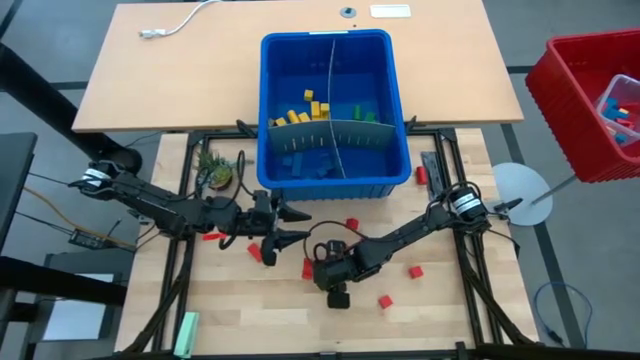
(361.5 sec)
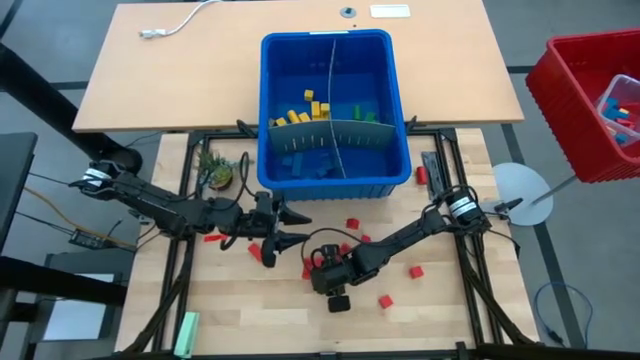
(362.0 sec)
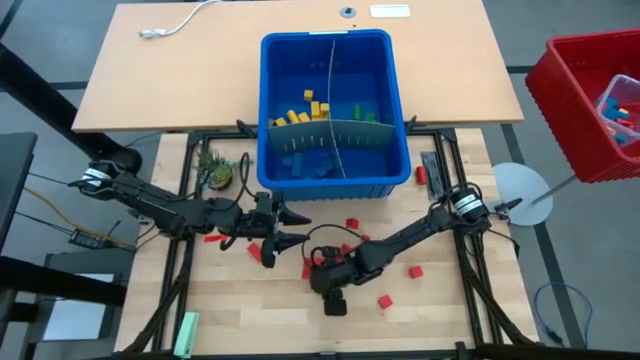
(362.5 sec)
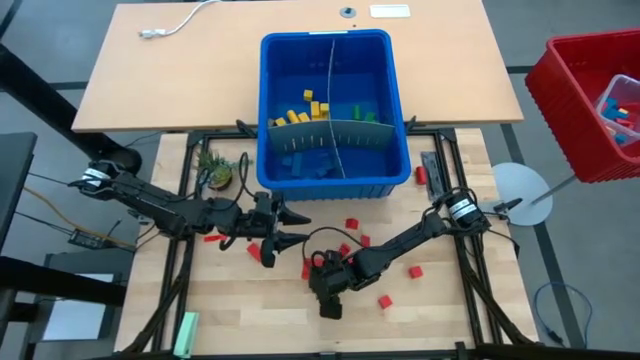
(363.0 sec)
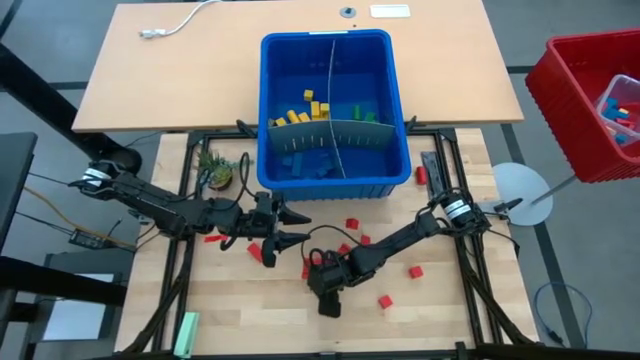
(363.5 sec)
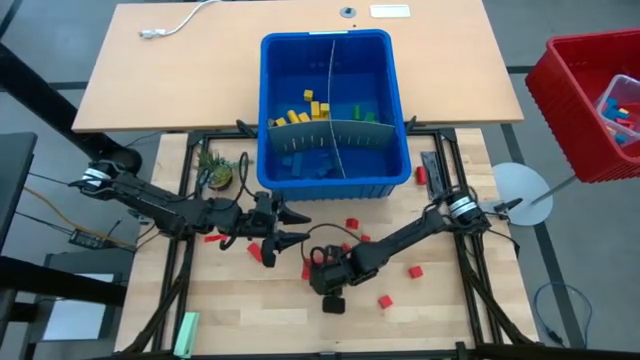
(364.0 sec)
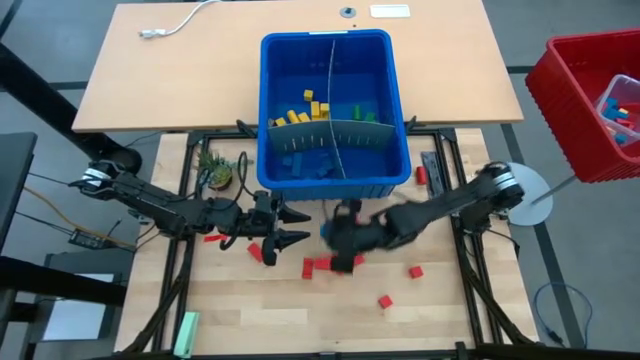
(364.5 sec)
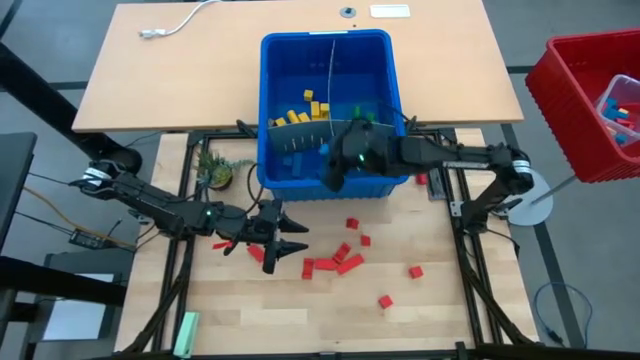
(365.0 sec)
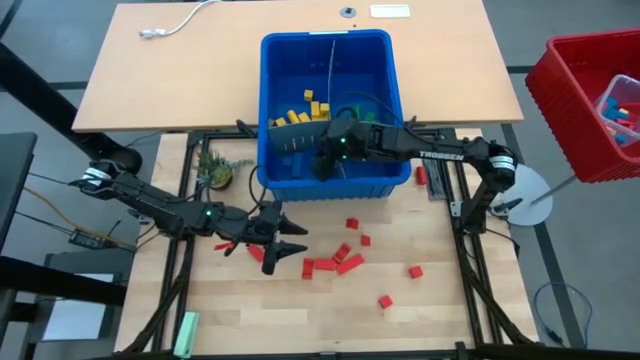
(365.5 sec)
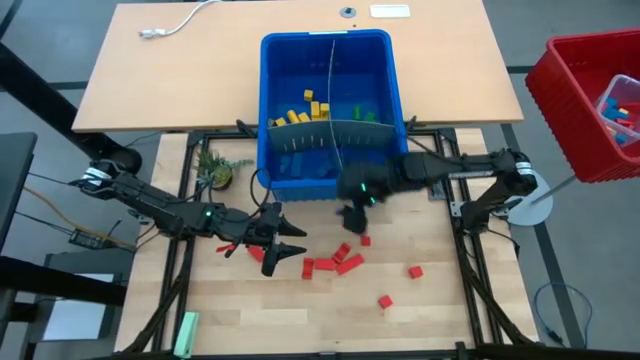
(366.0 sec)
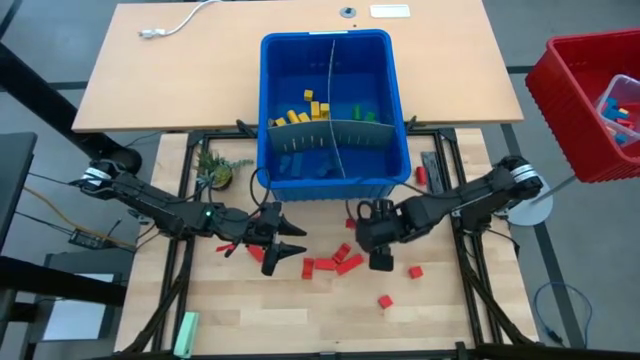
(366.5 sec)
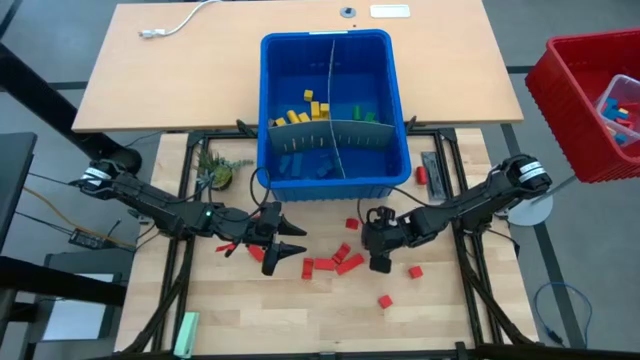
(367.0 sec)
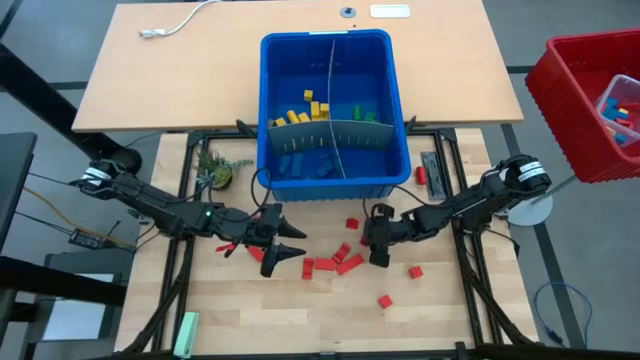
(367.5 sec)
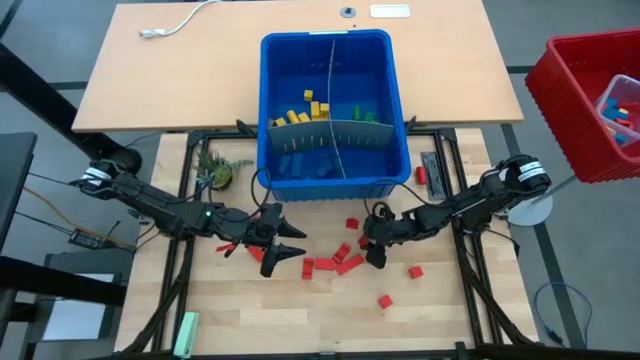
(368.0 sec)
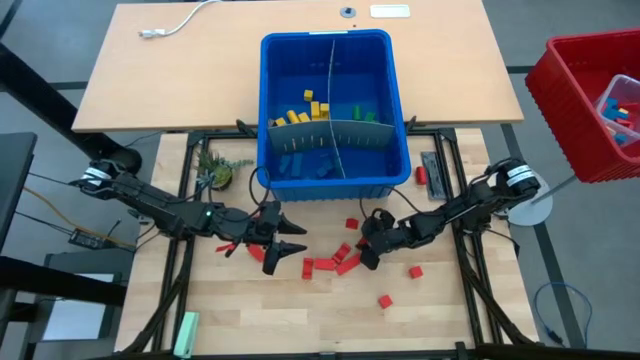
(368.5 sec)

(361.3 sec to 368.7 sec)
Task: Sort blocks
Put the blue block with the other blue blocks into the blue bin

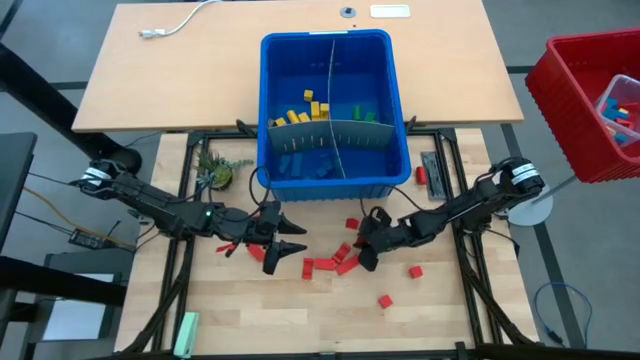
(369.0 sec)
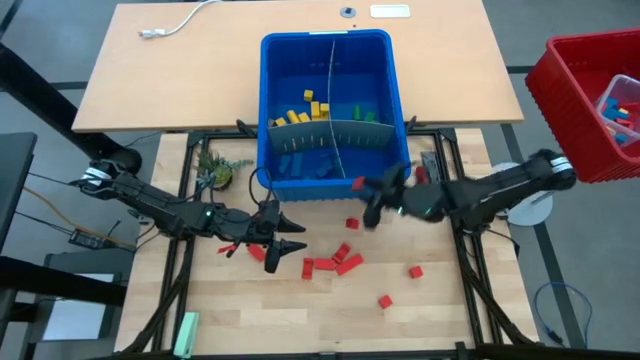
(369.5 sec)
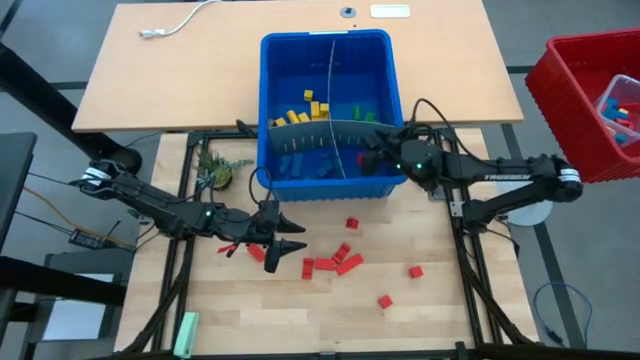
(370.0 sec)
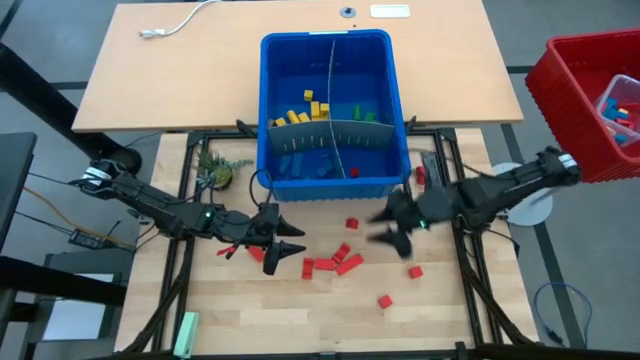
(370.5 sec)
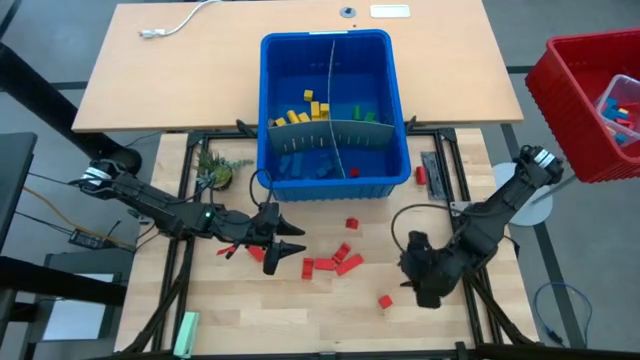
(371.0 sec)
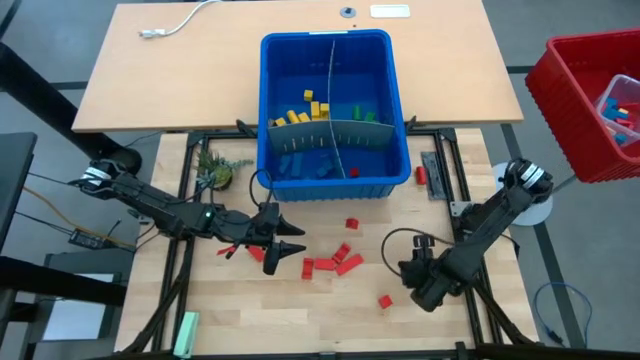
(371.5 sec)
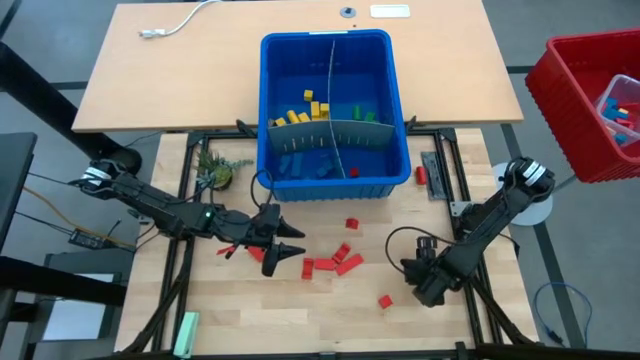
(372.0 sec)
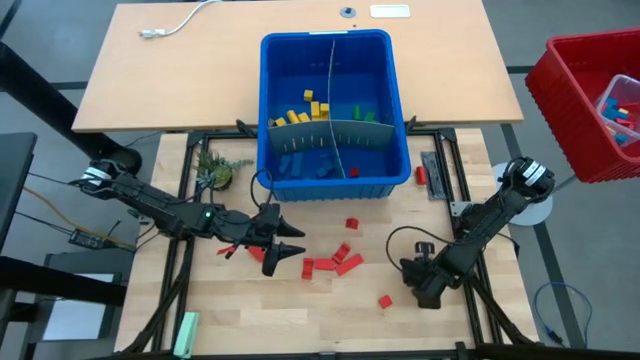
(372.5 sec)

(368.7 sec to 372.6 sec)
Put the orange block into the blue bin

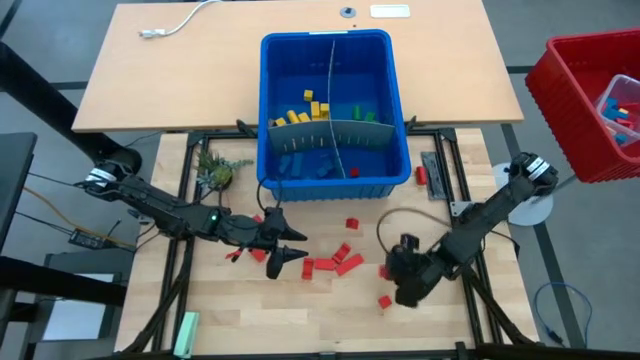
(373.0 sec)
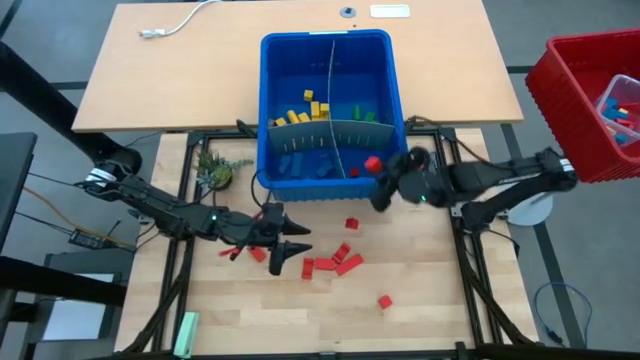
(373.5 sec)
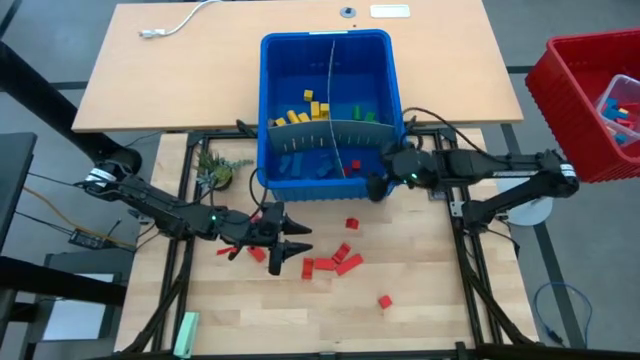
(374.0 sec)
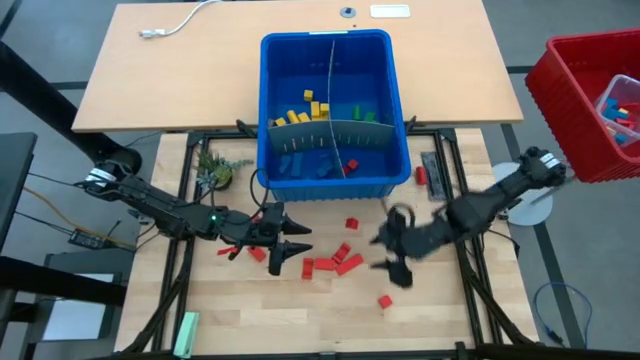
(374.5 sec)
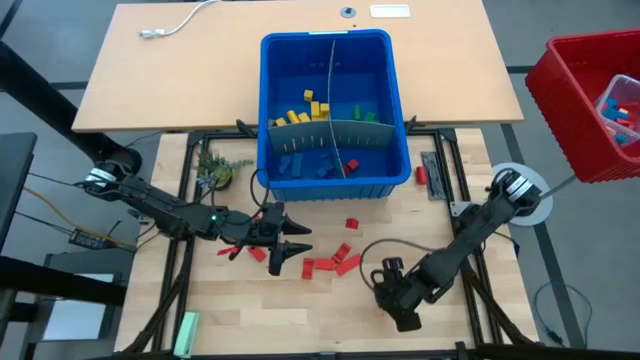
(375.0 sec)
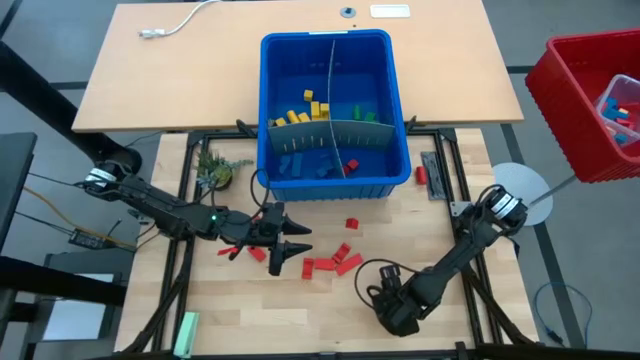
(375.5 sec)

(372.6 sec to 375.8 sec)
Put the orange block with the other orange block into the blue bin

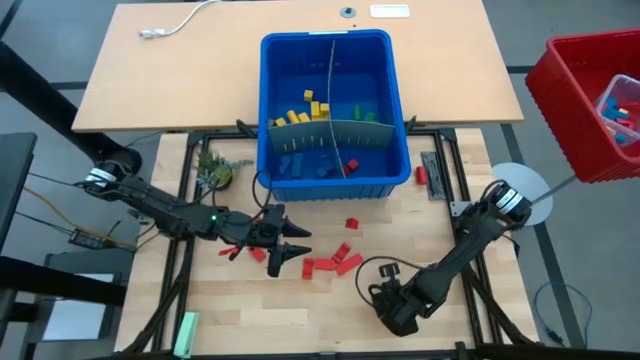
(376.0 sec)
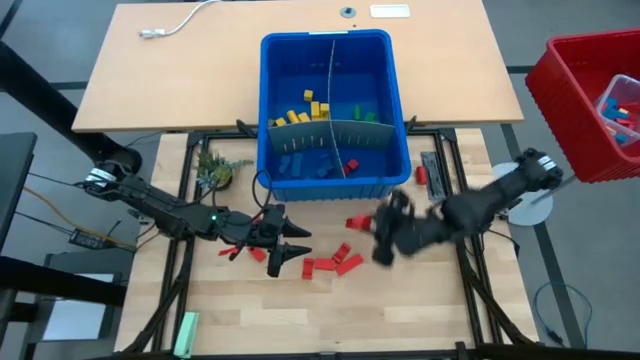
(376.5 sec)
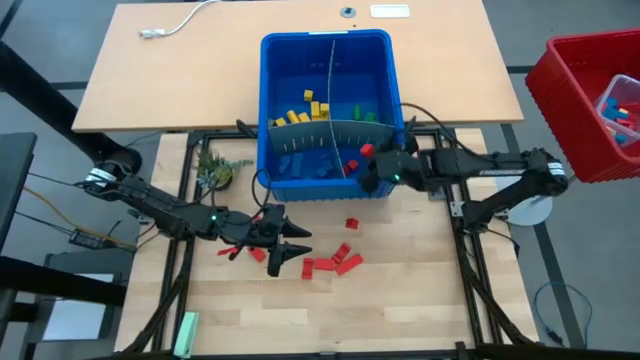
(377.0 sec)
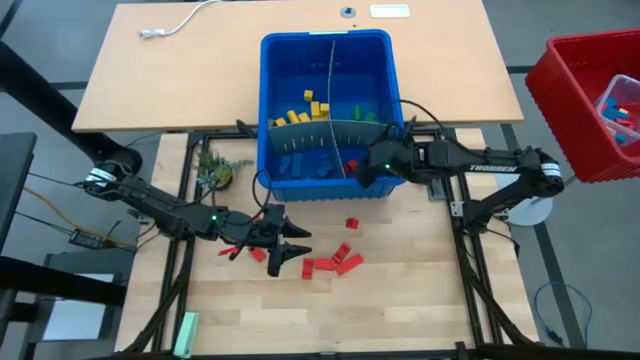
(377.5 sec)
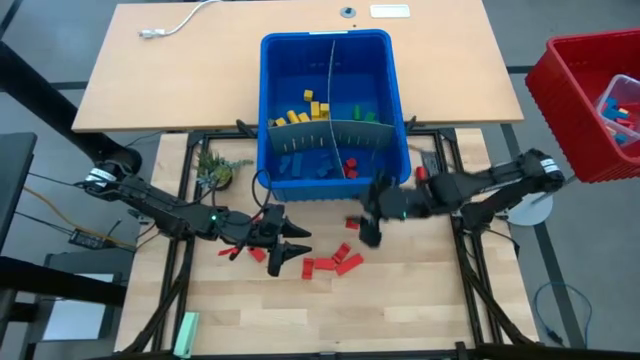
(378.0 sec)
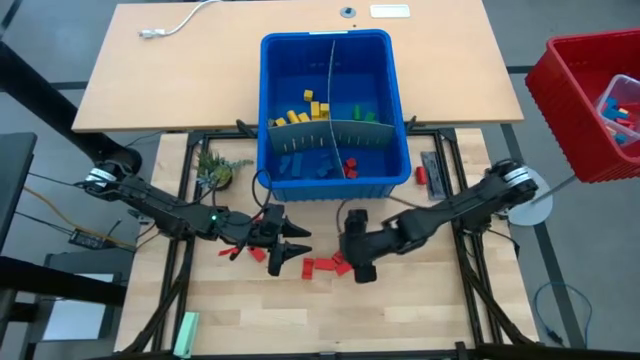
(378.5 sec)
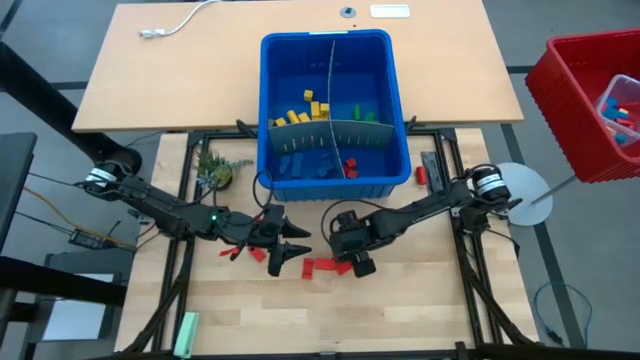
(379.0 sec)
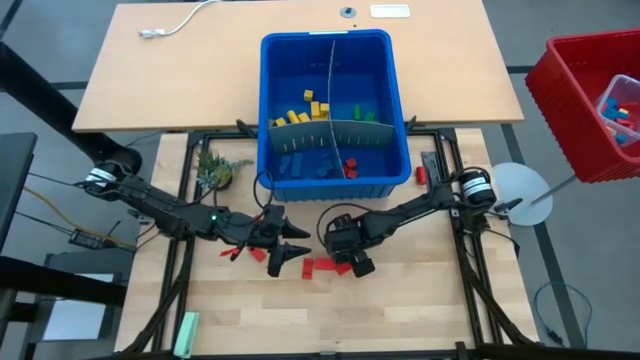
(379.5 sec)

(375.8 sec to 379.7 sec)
Put the orange block with the other orange blocks into the blue bin

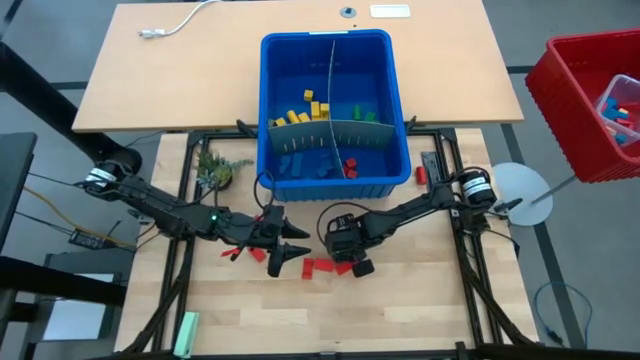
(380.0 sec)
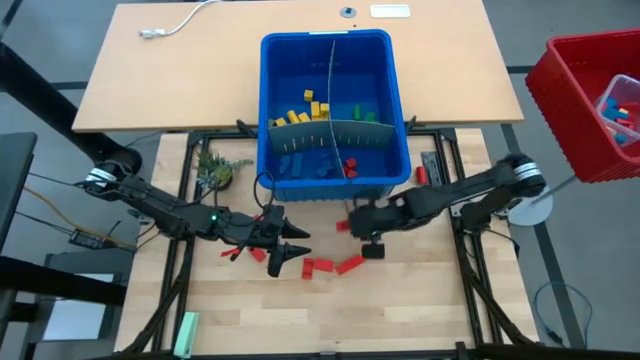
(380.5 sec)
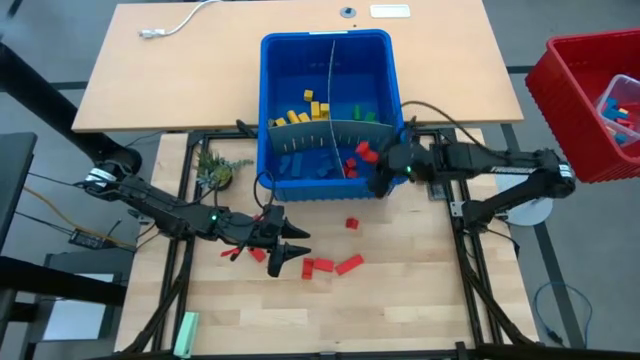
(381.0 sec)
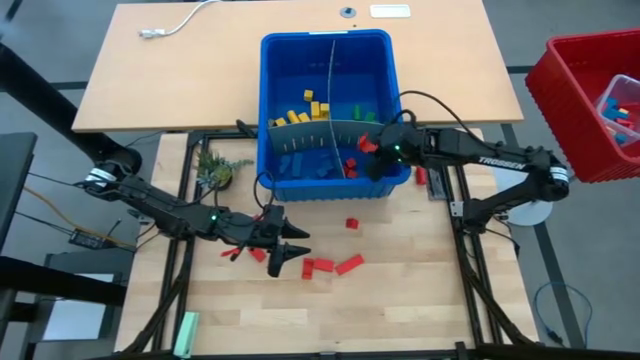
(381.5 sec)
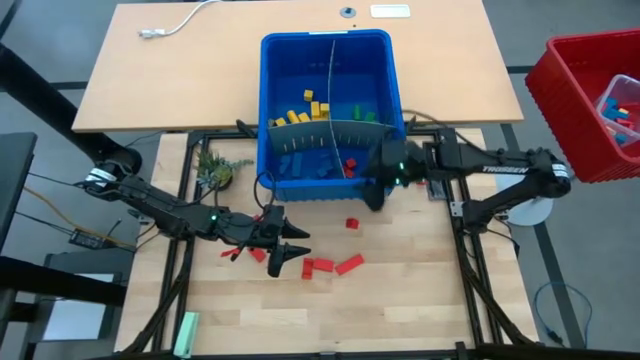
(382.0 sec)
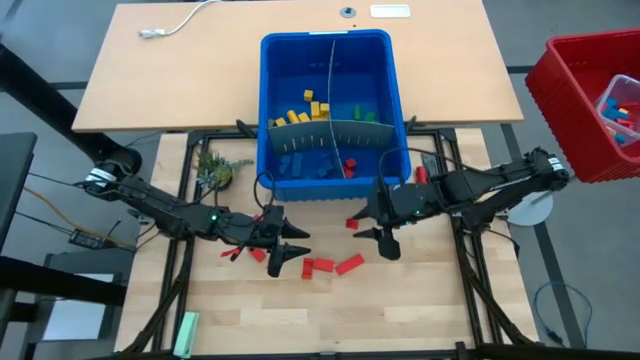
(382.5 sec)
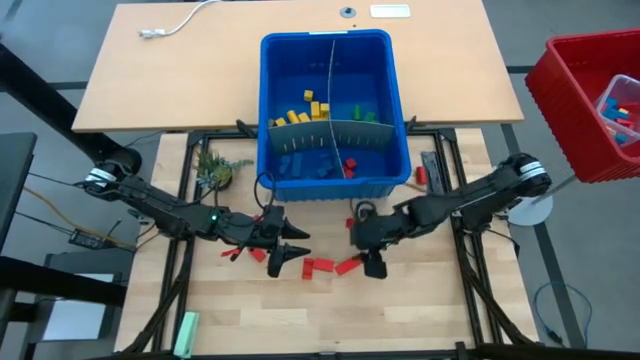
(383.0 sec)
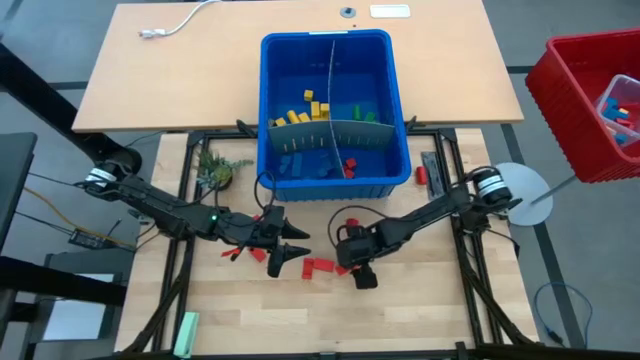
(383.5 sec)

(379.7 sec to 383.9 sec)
Put the orange block with the other orange blocks into the blue bin
